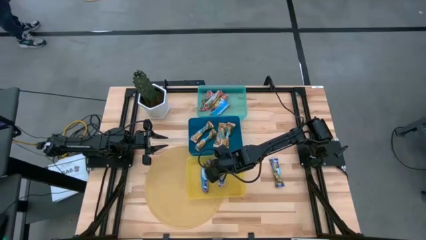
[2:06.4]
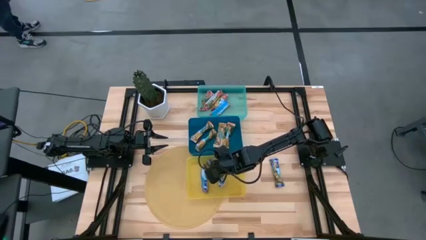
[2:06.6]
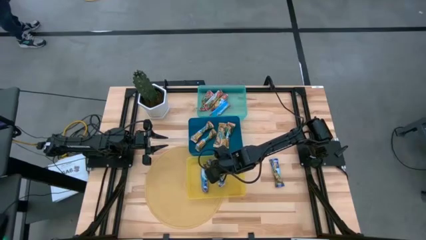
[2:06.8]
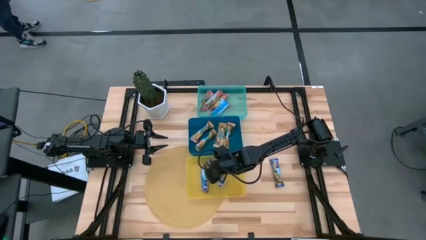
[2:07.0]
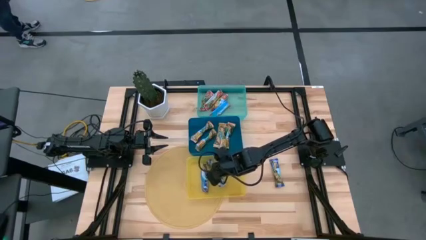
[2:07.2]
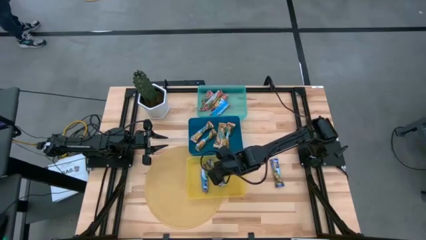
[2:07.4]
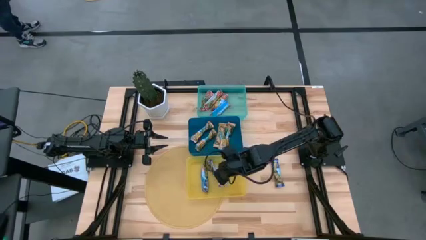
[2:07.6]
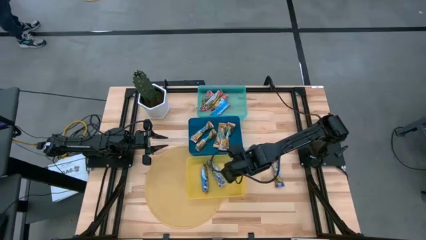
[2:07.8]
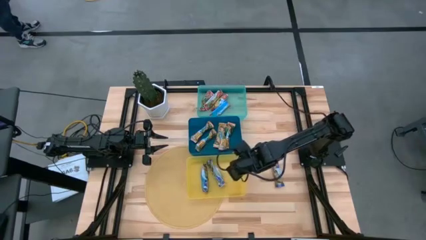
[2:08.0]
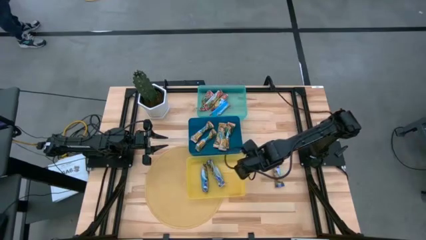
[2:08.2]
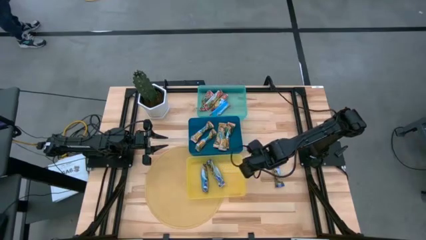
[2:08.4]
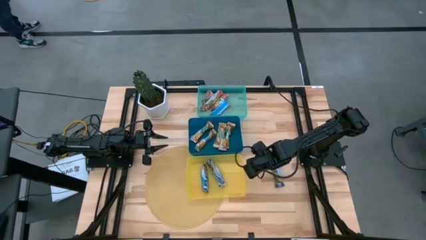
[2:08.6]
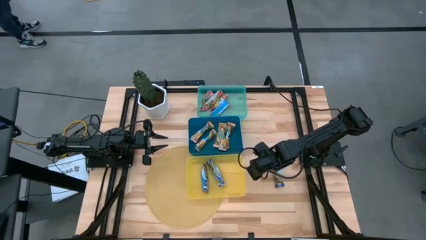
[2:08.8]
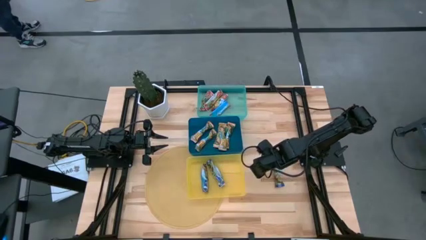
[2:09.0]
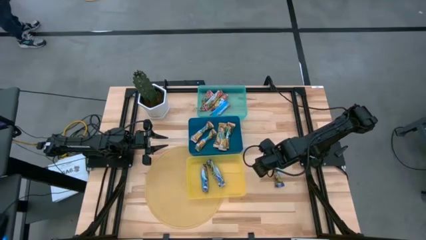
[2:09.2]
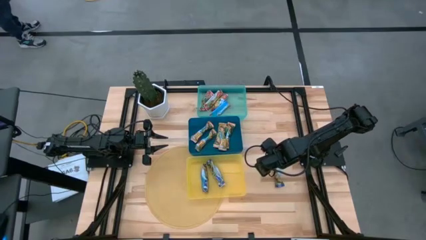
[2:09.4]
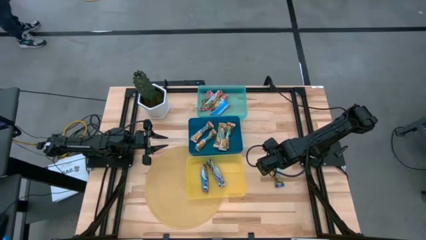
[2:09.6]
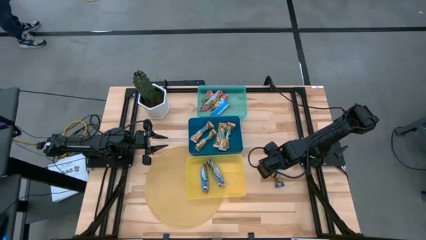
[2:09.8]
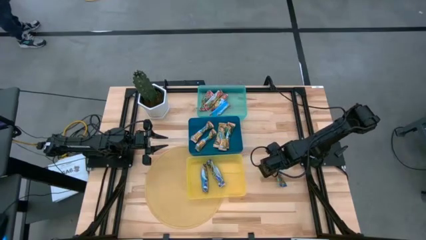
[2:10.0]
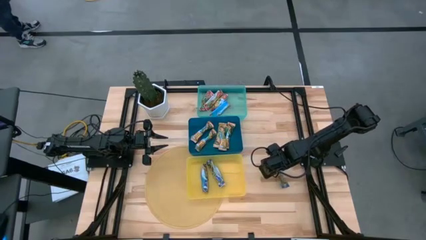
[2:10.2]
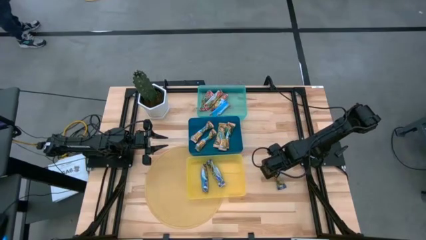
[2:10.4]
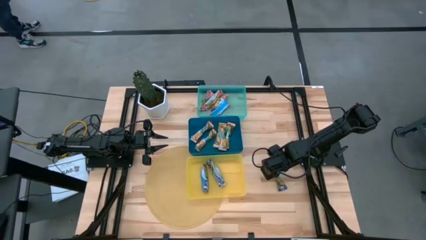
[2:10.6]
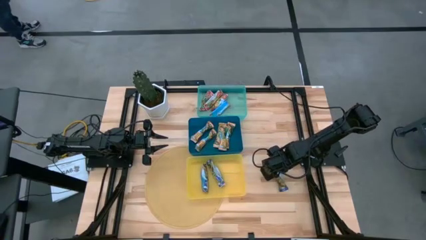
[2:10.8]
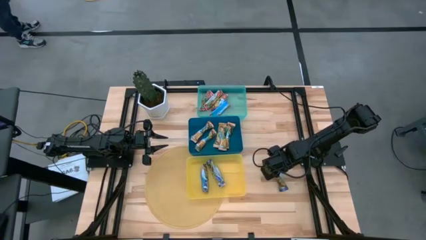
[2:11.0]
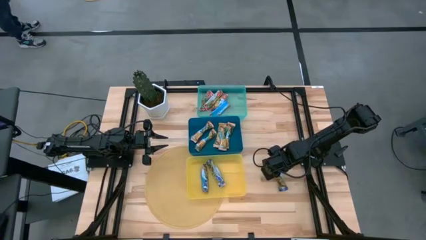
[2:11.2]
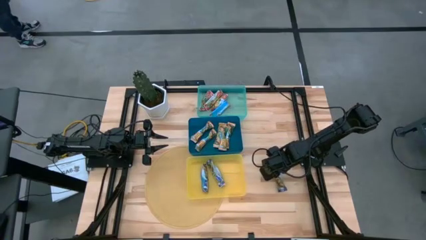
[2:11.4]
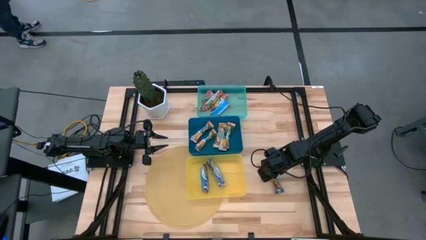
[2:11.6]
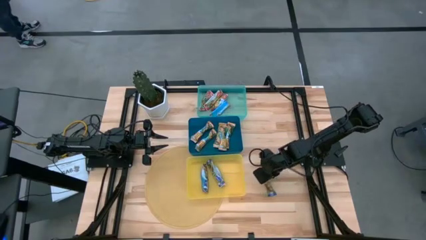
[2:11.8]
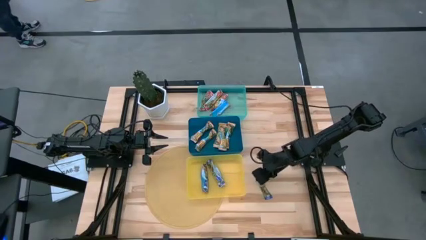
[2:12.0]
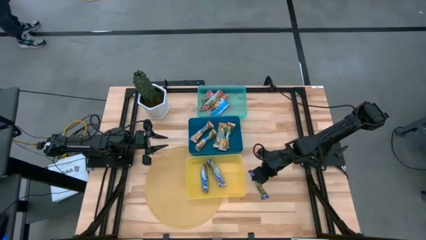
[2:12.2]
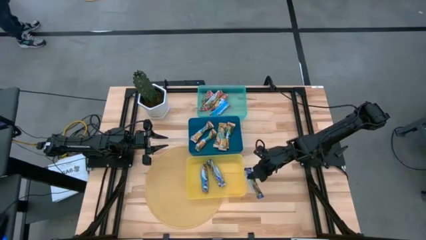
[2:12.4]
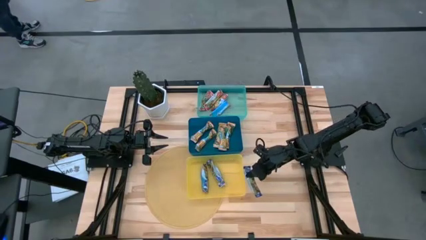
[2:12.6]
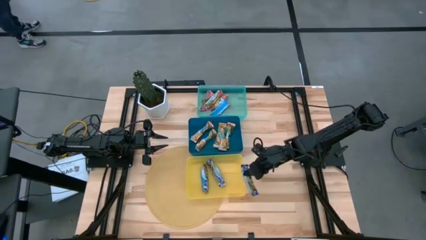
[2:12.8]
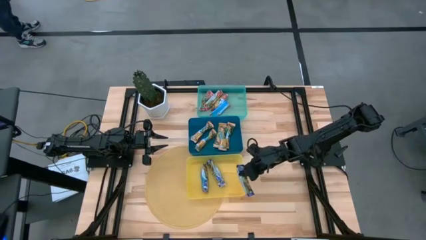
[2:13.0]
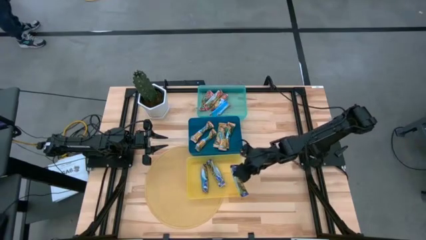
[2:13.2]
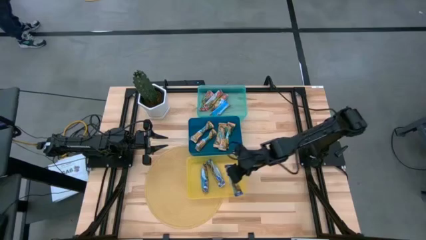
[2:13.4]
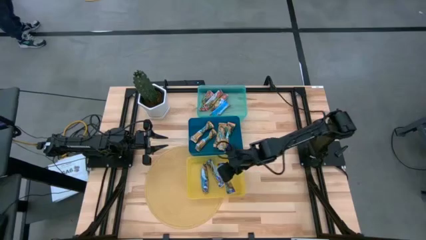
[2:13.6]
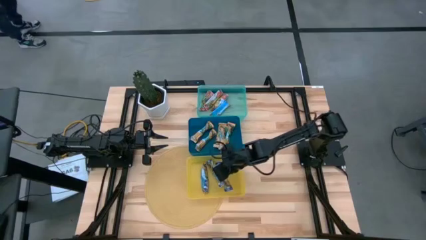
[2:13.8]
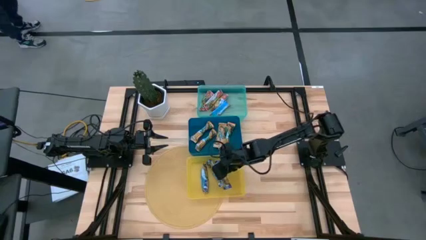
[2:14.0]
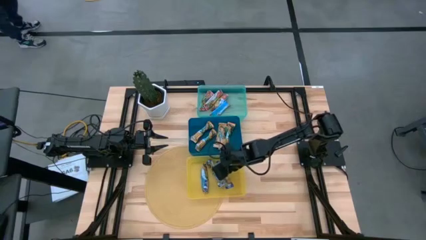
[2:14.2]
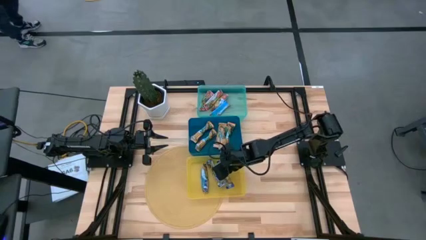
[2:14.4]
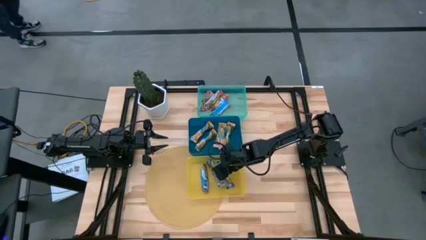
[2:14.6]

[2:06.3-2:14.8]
Task: Pick and place Granola Bars by type
Put the blue granola bar into the yellow bin

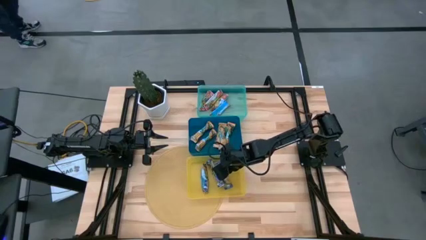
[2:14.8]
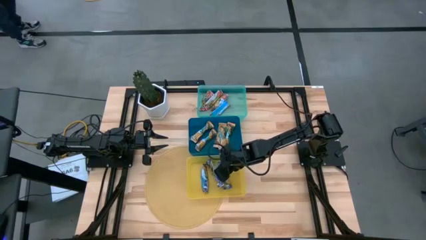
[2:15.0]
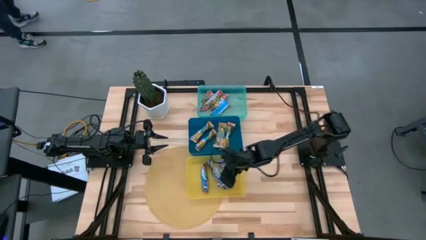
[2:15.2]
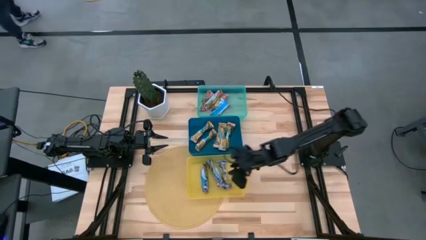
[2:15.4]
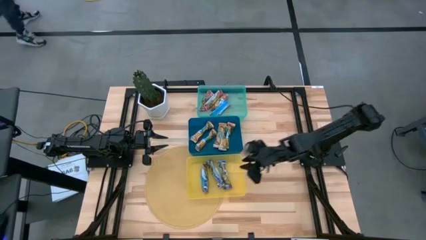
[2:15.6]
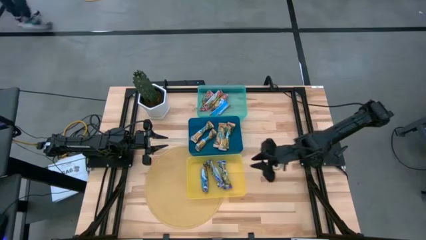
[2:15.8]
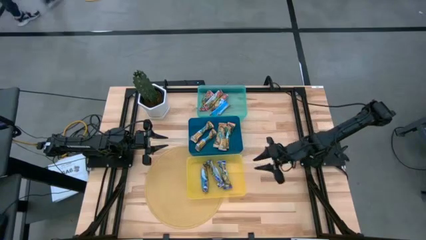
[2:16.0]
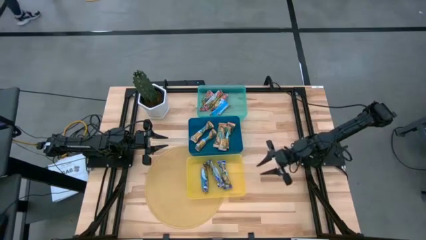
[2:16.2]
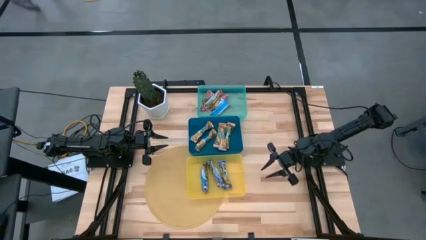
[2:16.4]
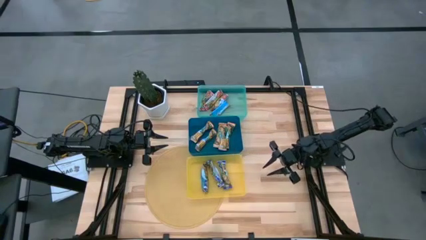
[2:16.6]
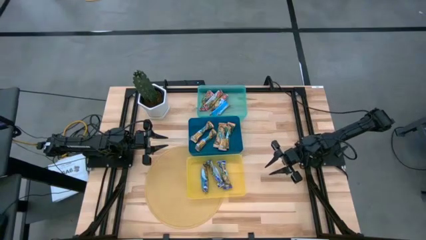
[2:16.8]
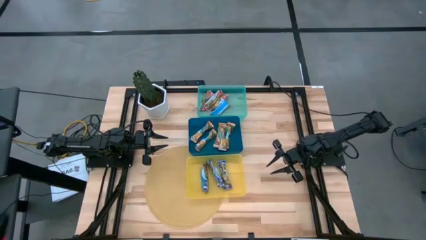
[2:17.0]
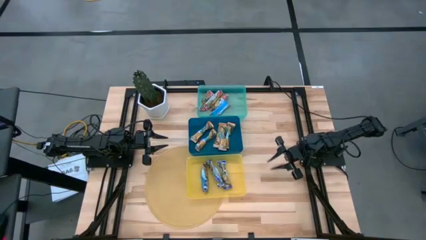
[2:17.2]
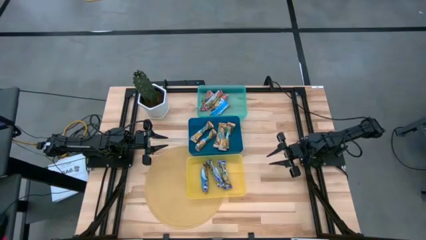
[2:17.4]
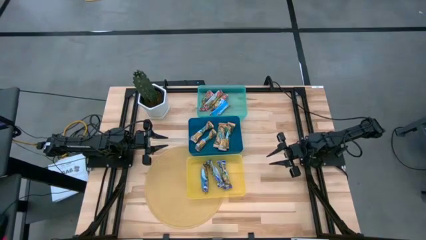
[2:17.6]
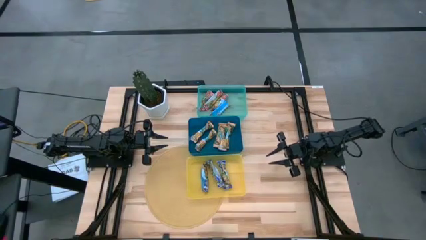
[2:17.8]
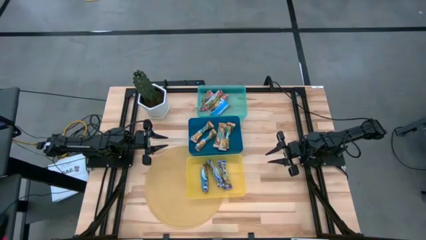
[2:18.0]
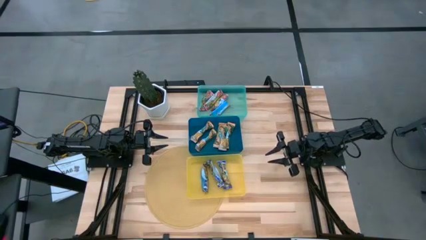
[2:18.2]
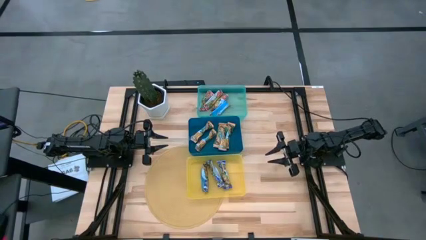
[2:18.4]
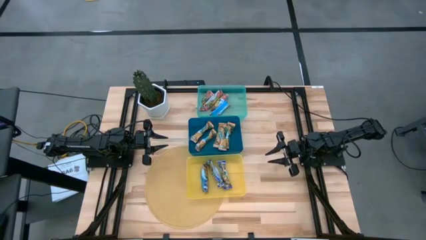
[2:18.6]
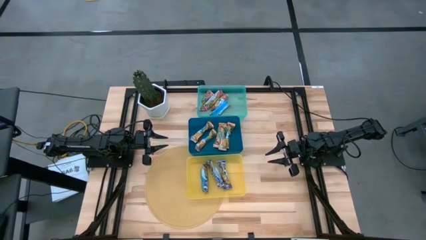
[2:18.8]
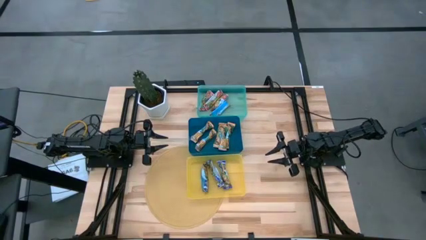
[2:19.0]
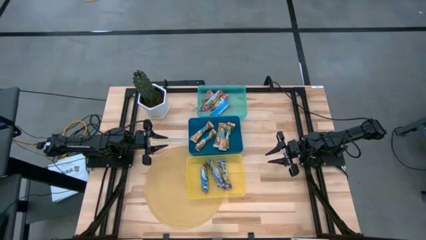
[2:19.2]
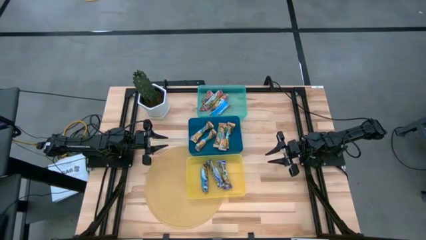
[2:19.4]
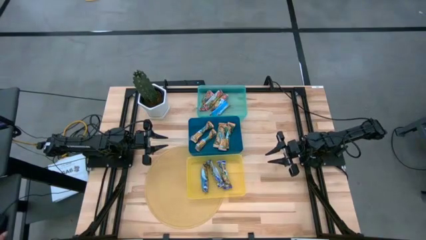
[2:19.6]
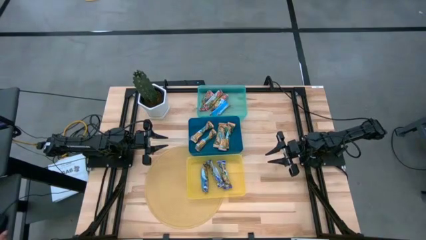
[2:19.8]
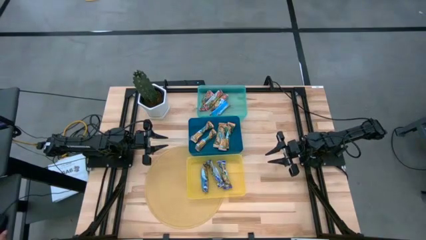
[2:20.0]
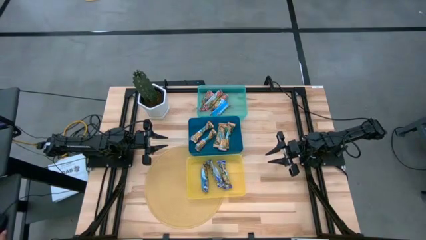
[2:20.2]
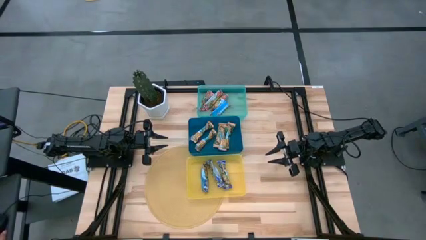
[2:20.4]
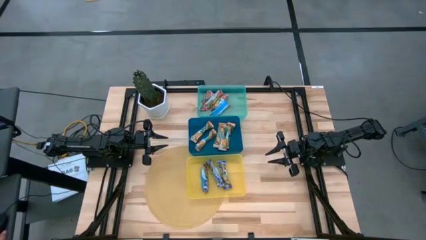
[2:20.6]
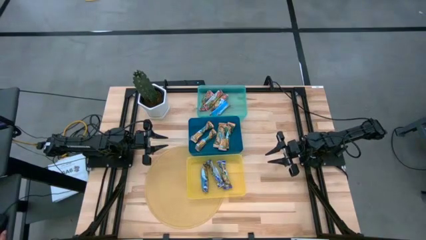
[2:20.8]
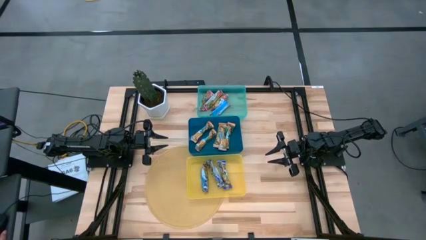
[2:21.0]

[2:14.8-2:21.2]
Return to Home Position

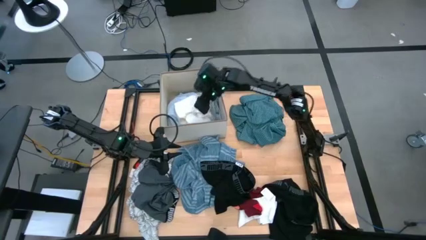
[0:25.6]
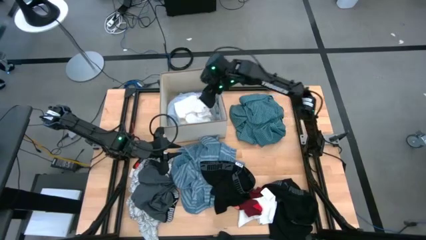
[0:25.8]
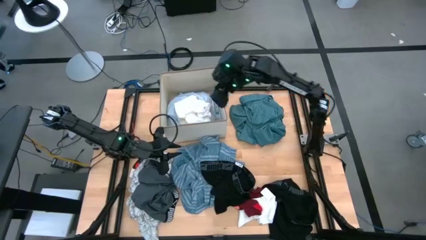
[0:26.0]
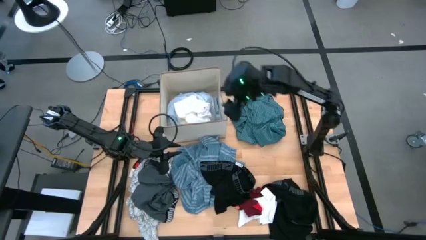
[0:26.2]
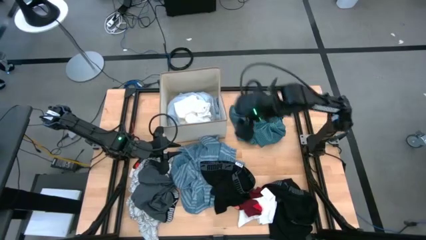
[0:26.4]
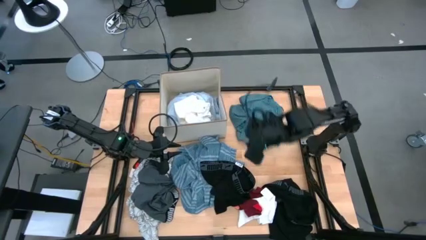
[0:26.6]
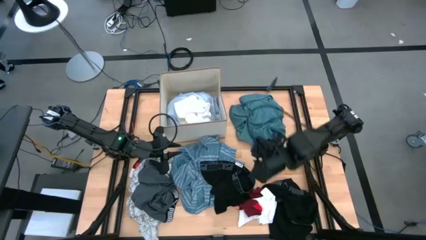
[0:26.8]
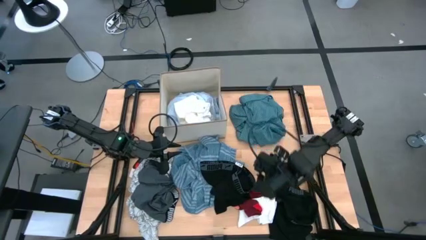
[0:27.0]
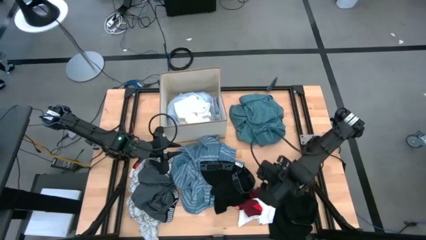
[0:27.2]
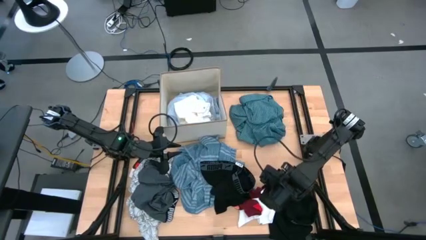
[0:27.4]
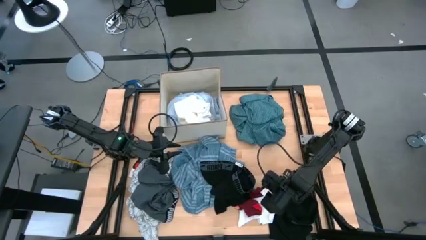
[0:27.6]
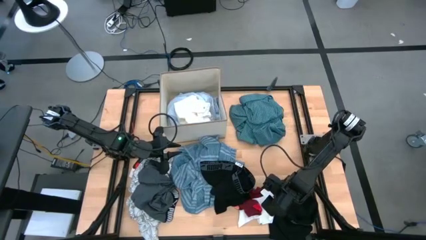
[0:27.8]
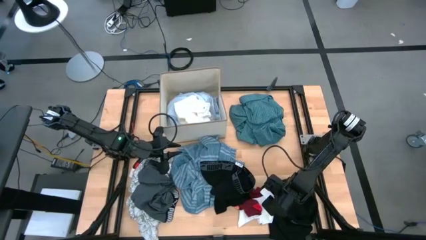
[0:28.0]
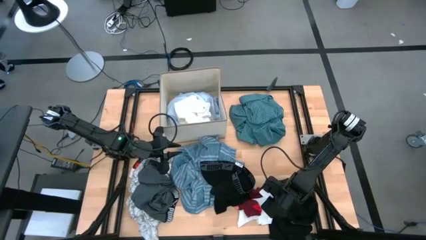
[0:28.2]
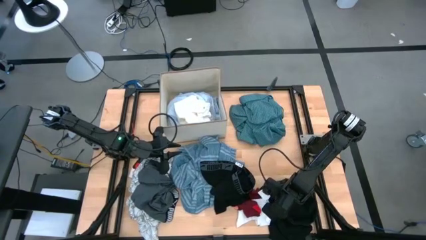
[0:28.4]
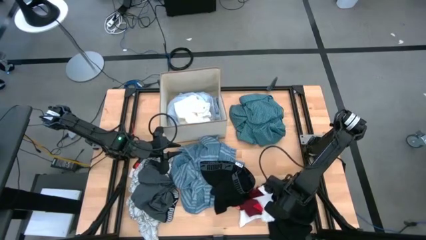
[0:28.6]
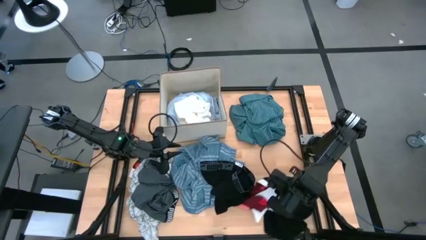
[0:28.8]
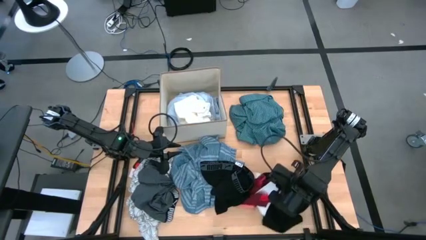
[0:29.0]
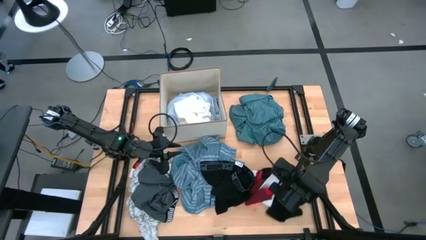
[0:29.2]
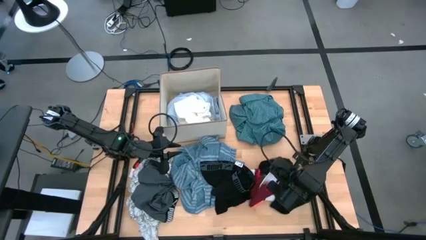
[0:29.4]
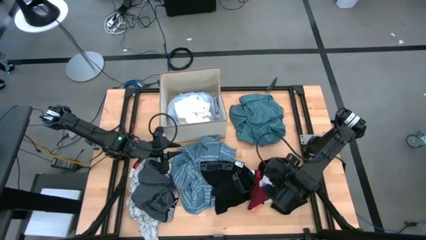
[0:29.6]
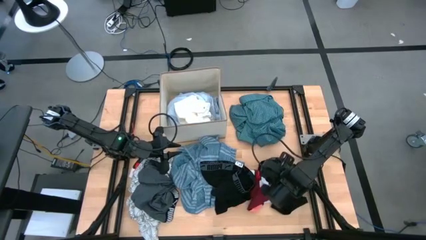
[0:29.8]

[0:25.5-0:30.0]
Task: Sort clothes
Put the white sock into the white laundry organizer
